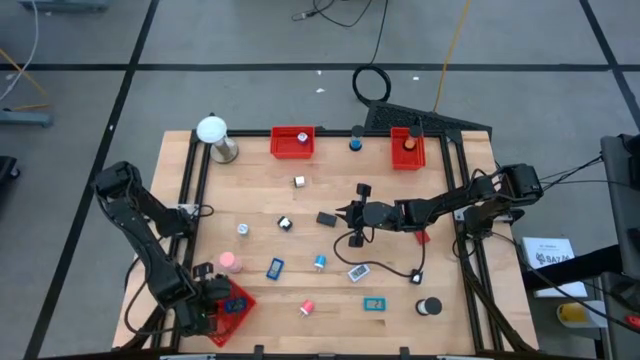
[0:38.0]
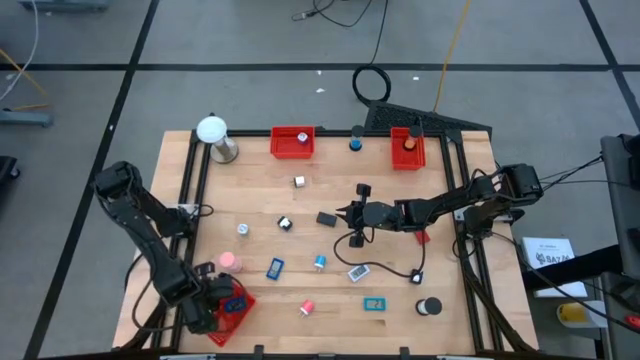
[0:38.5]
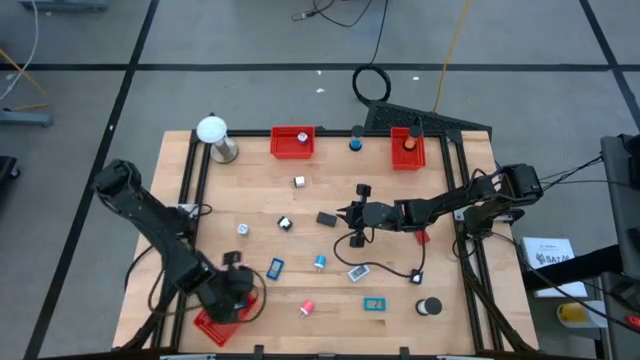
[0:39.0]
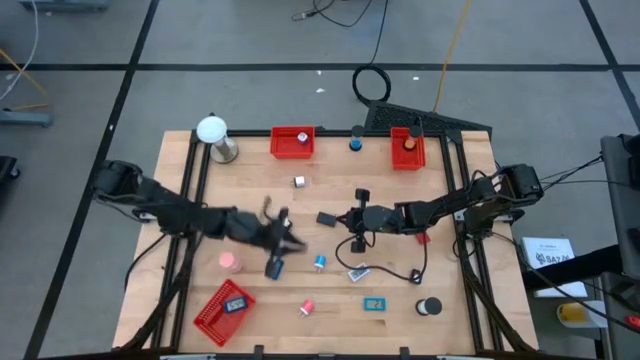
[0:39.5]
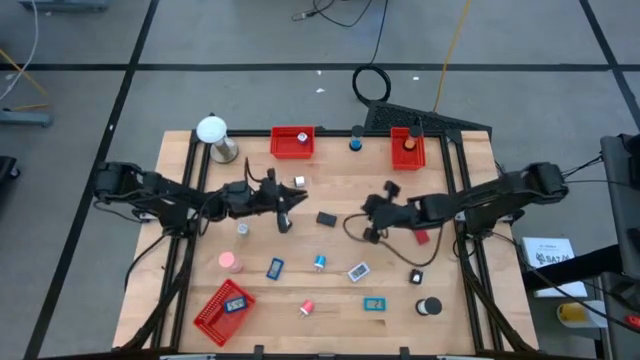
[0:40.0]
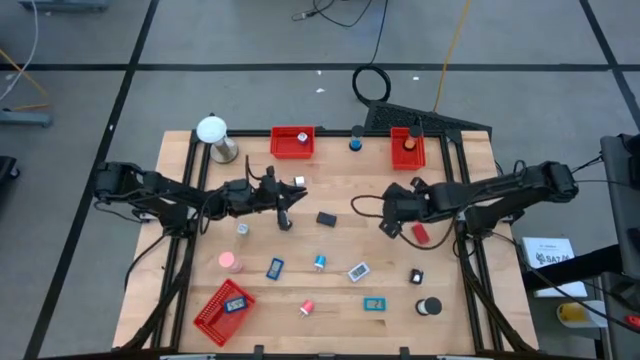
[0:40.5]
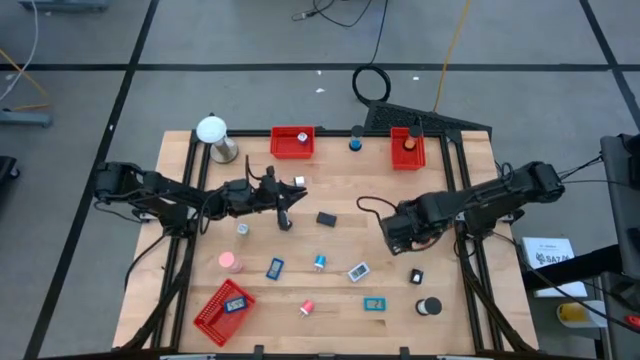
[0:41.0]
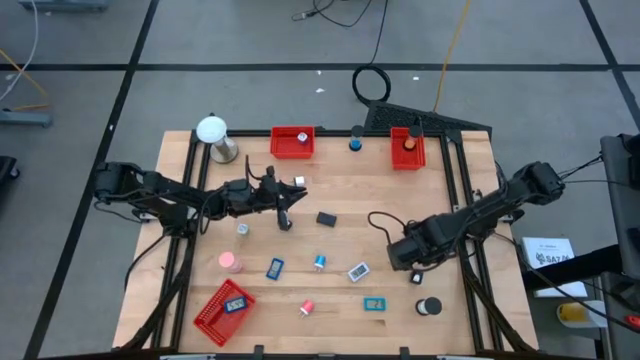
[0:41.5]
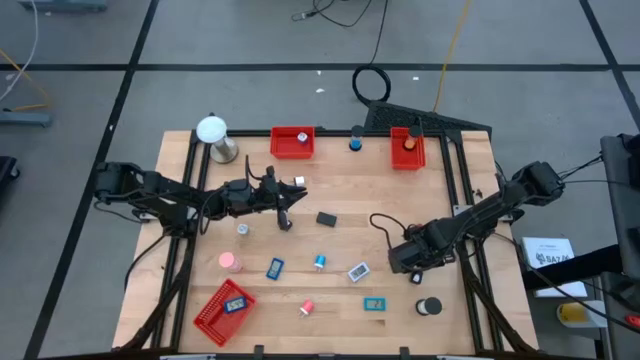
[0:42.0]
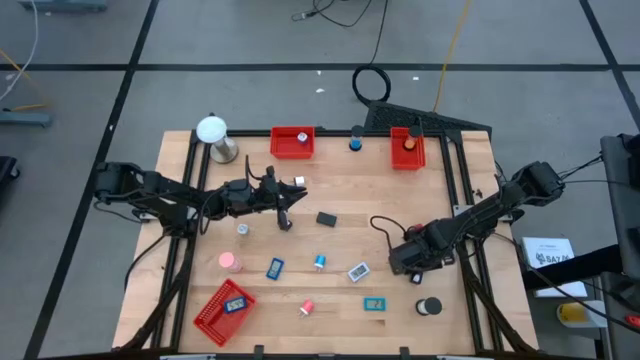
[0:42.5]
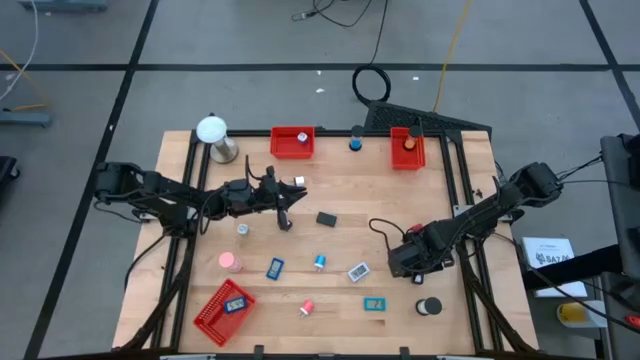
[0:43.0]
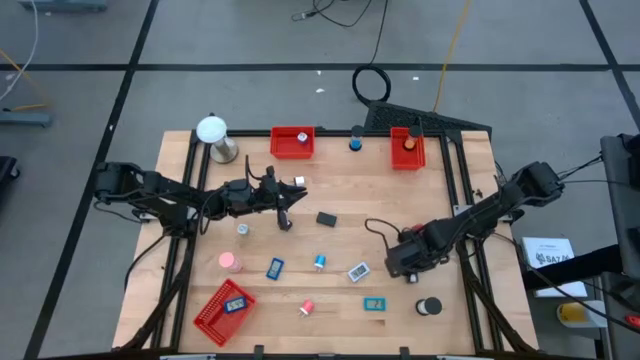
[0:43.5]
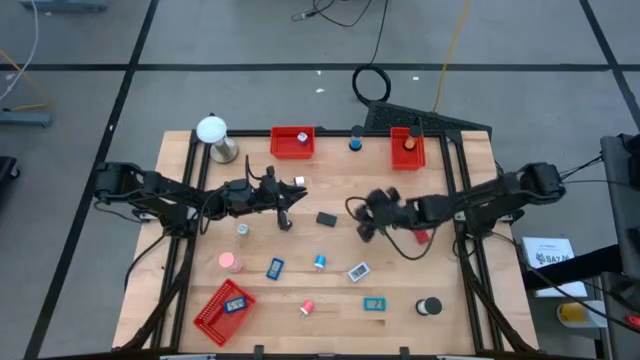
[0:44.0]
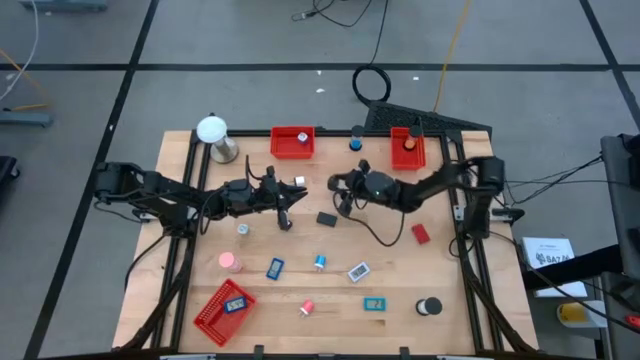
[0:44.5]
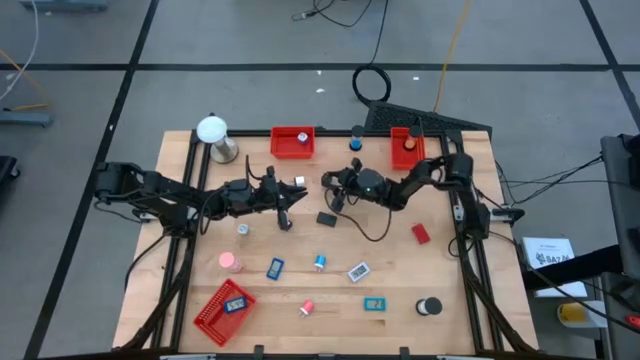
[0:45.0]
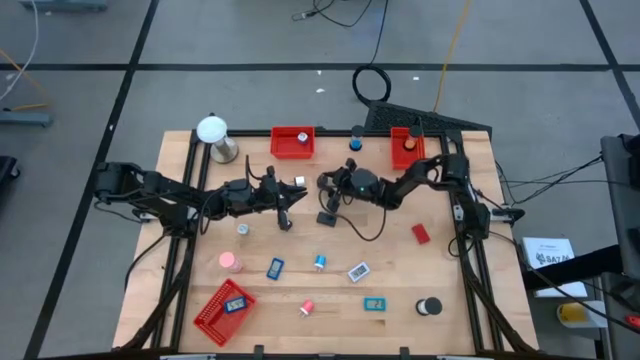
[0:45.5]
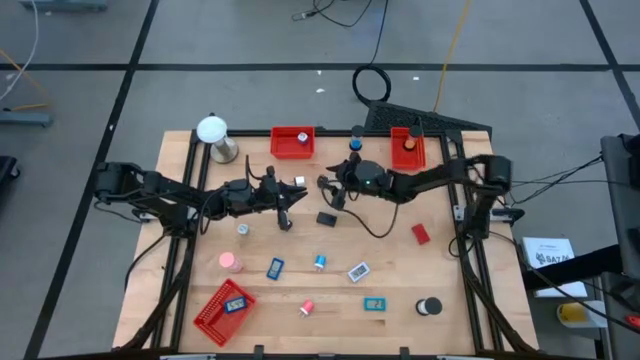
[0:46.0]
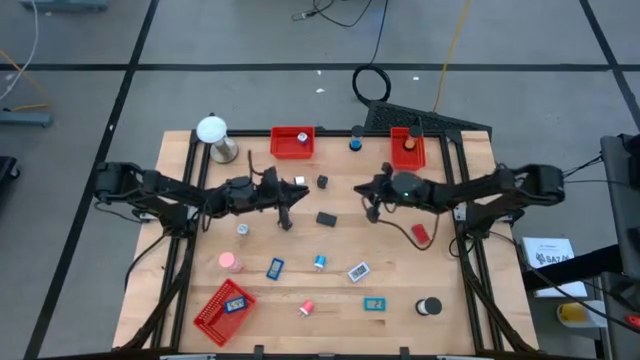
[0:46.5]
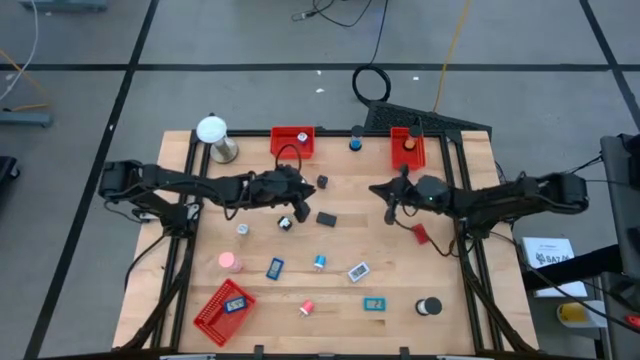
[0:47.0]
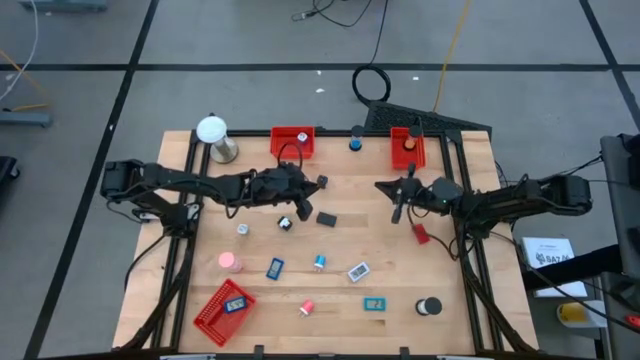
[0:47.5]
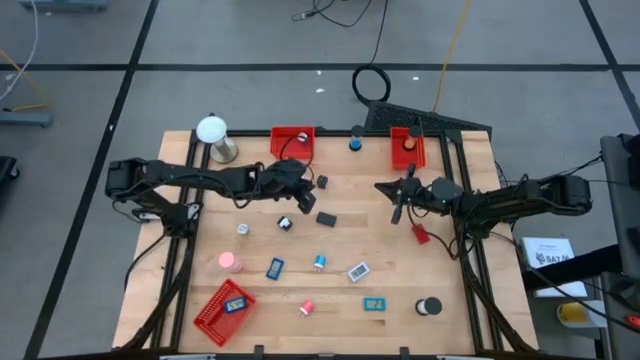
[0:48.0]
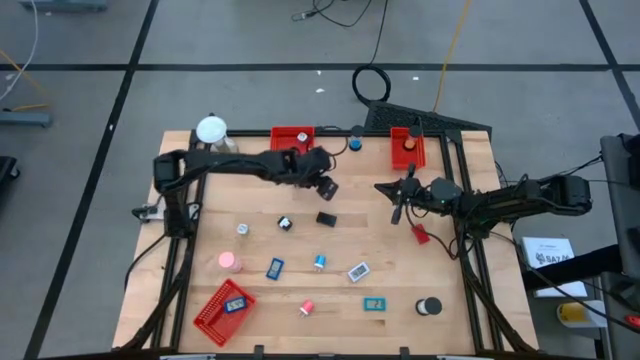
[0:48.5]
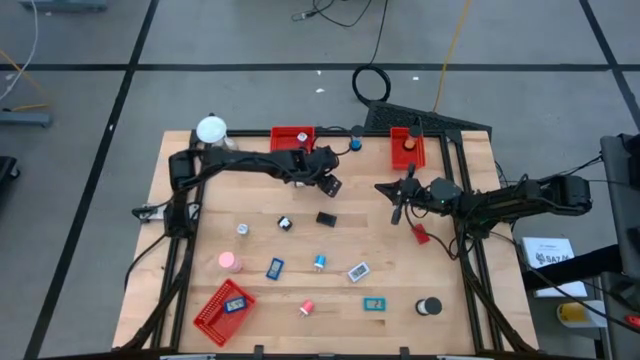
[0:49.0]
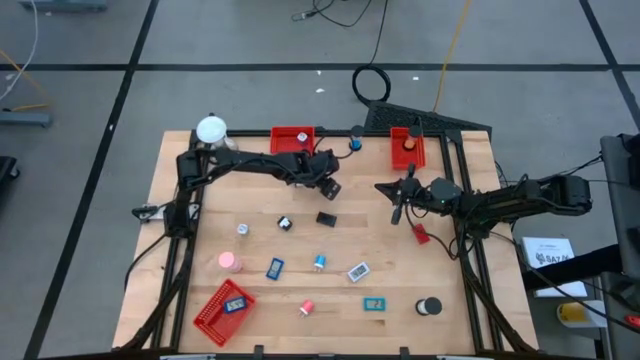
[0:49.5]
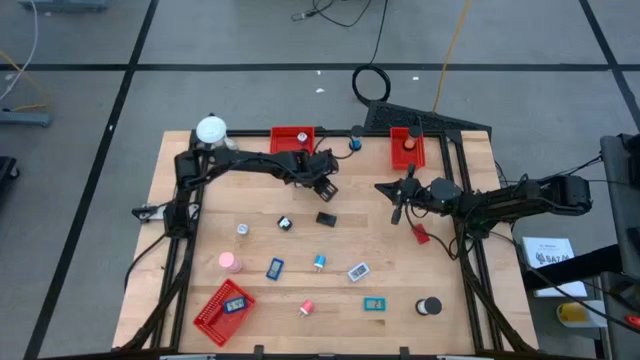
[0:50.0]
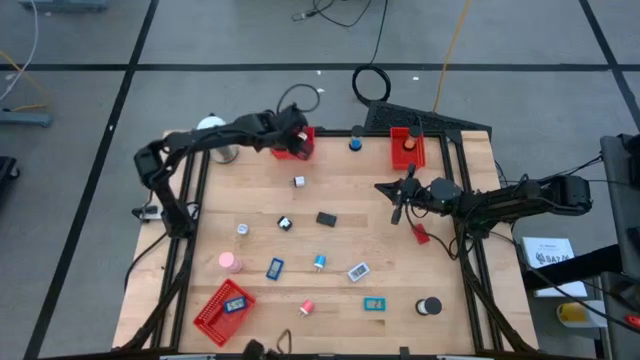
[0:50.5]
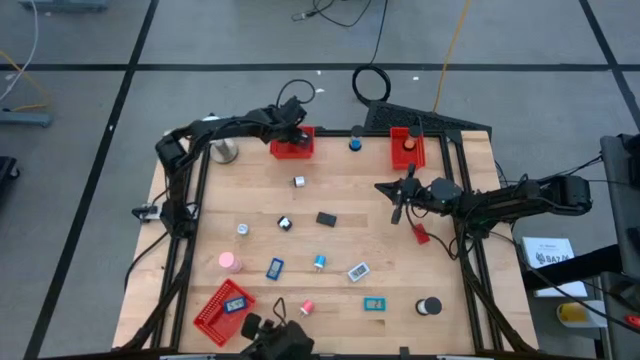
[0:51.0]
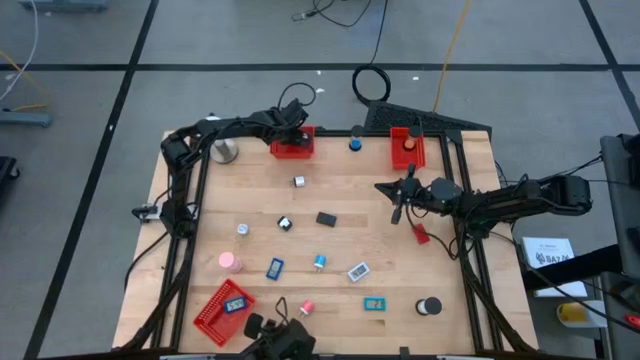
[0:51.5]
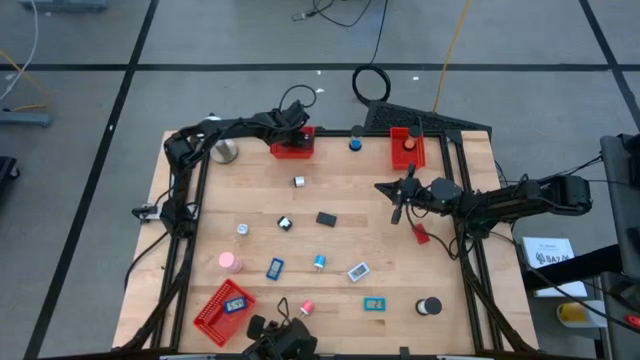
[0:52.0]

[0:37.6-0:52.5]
Task: Pick & Place Office items
Put the right black charger adapter into the top left red basket

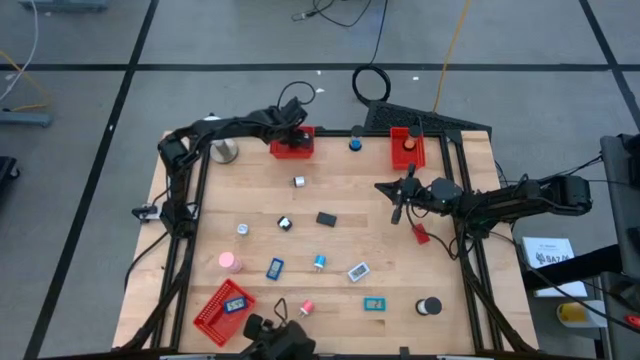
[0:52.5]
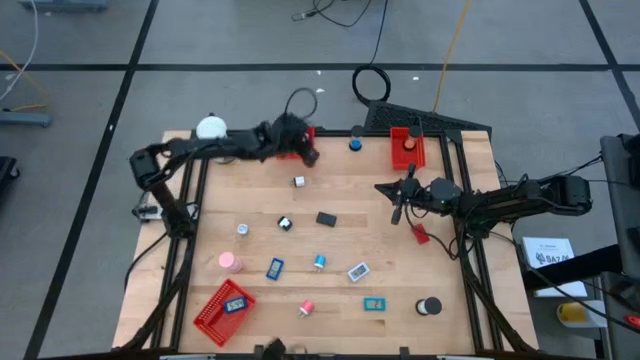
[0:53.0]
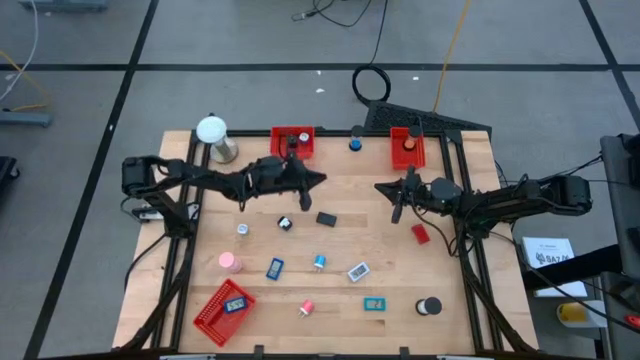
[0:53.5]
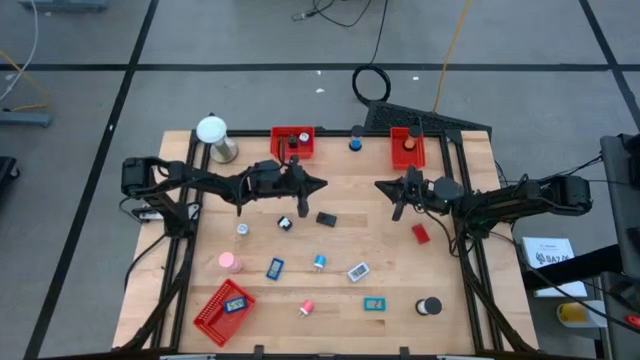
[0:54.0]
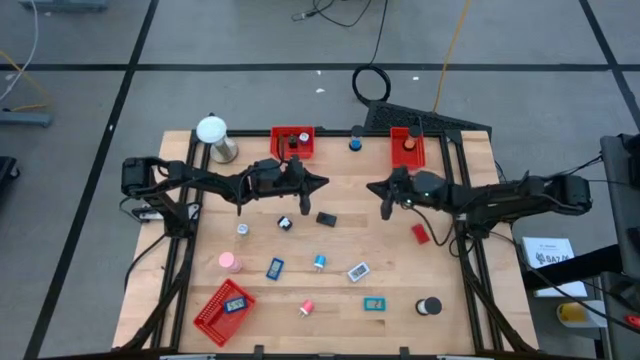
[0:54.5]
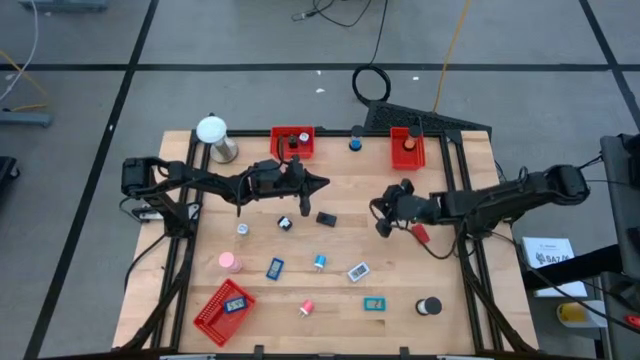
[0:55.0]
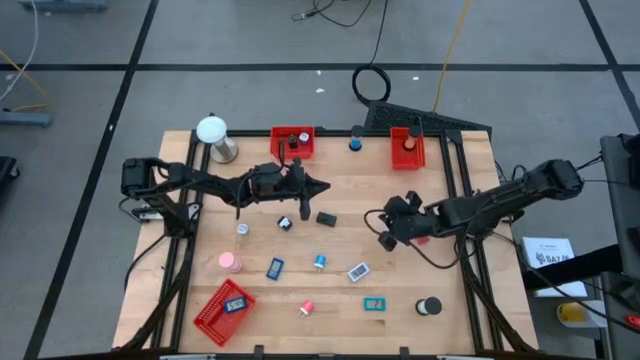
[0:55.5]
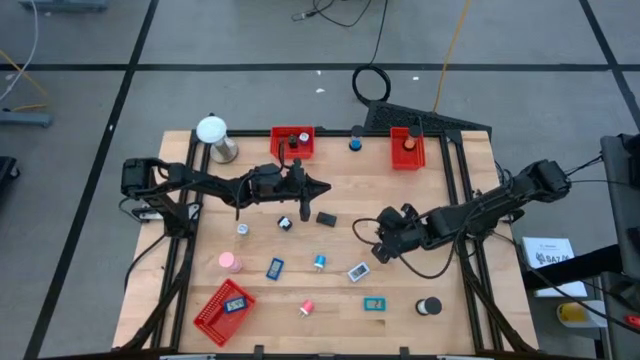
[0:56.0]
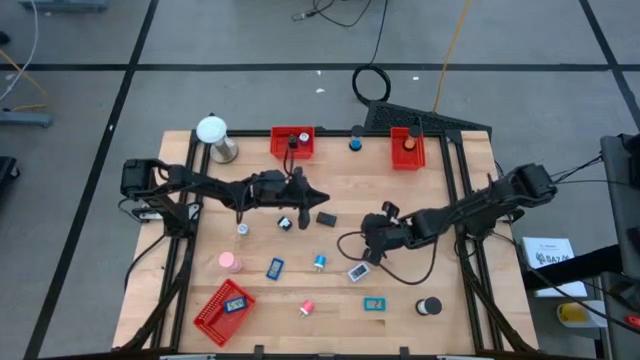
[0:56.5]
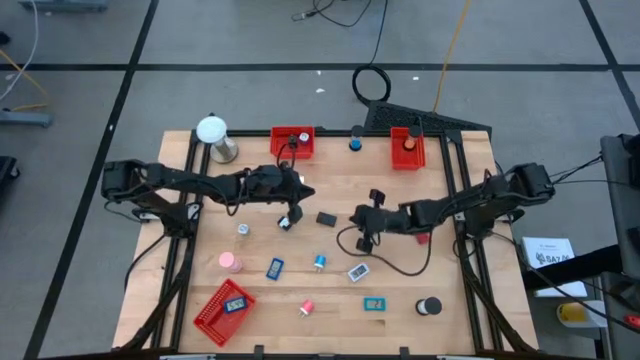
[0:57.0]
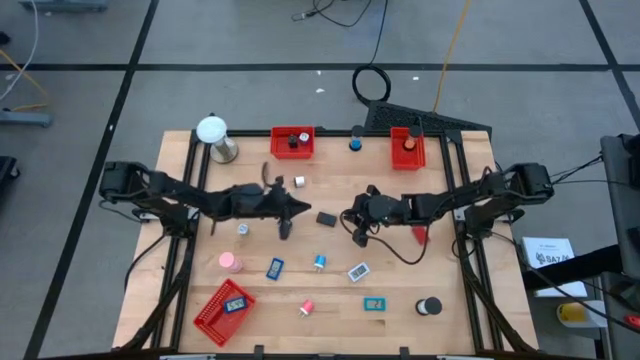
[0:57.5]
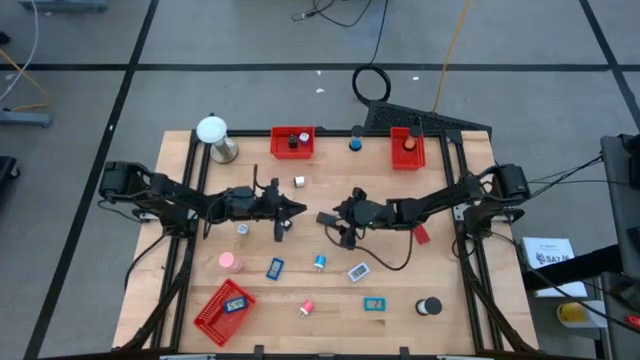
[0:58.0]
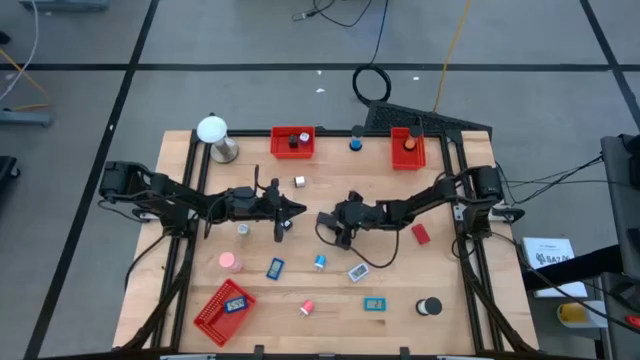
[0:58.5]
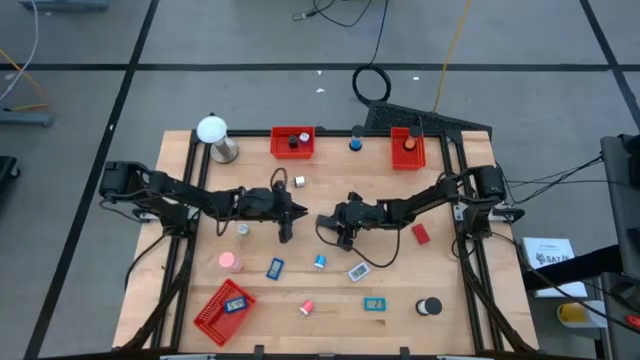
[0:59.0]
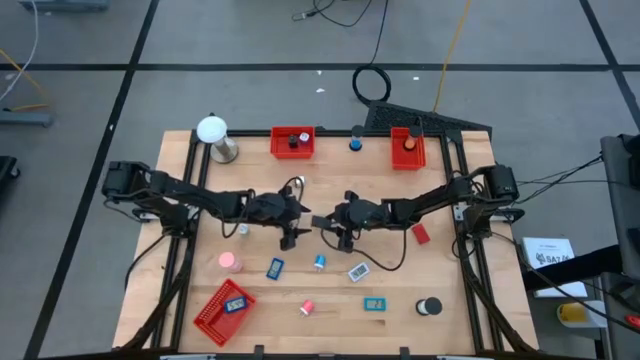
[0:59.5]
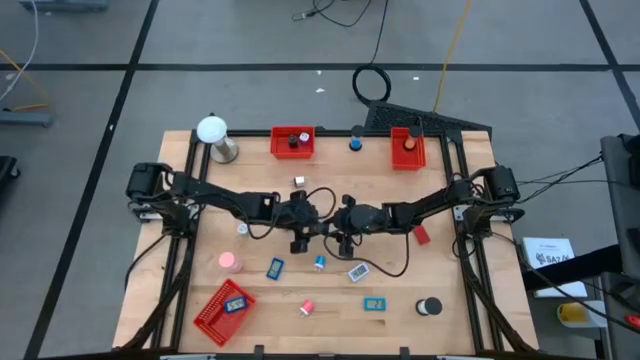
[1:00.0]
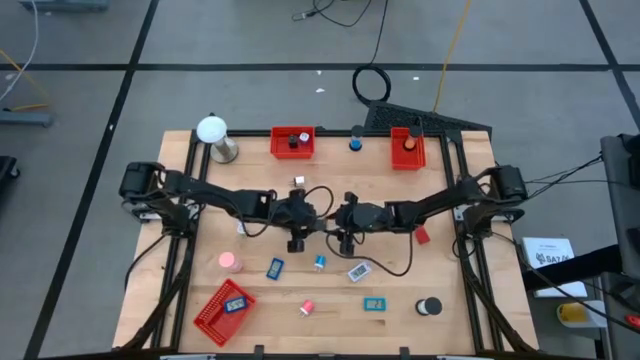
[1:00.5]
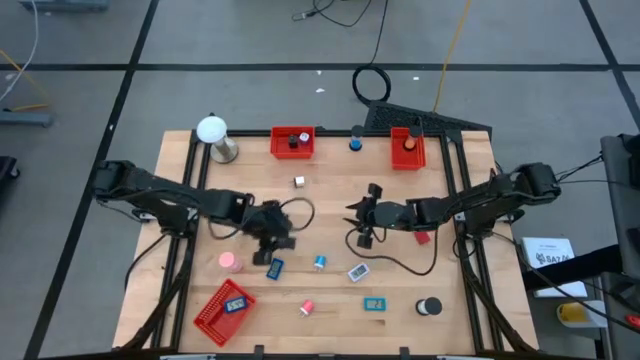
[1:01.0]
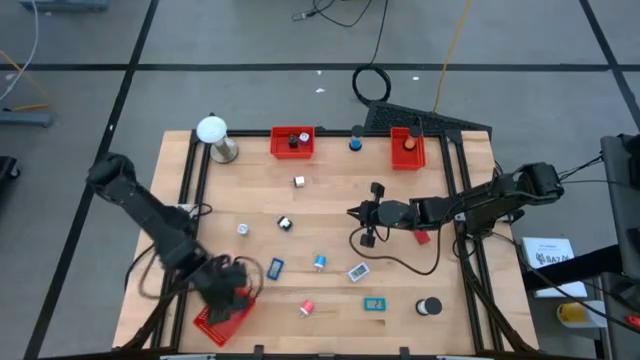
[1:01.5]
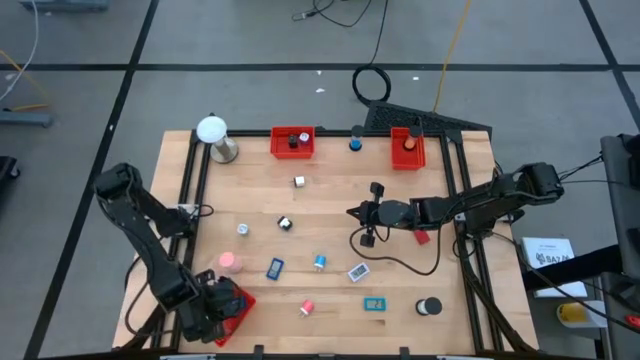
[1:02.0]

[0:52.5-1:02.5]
Put the black timer into the bottom red basket
